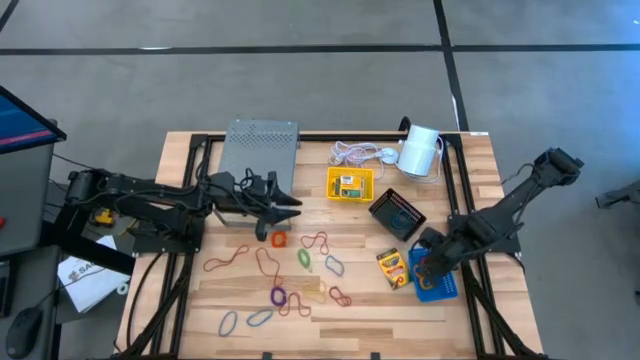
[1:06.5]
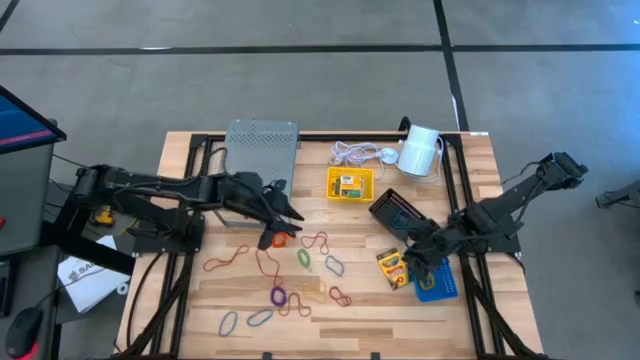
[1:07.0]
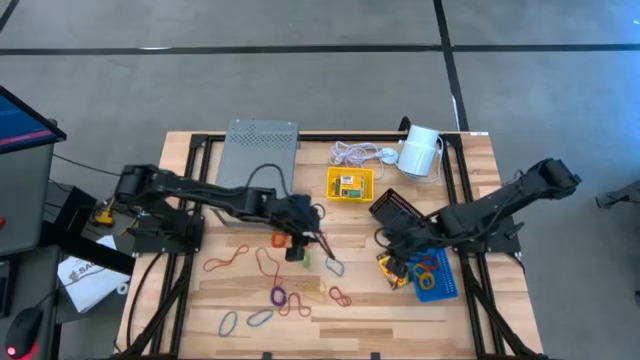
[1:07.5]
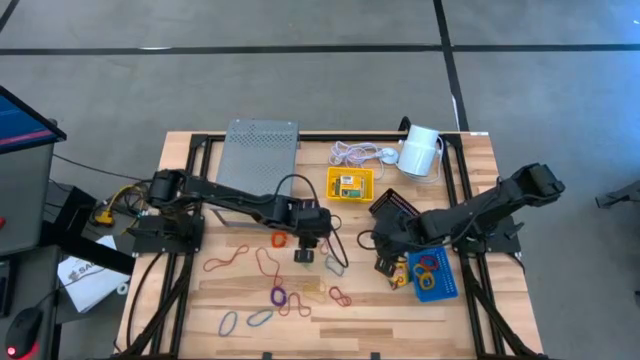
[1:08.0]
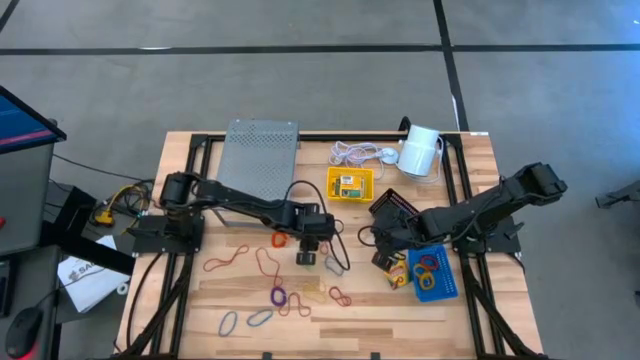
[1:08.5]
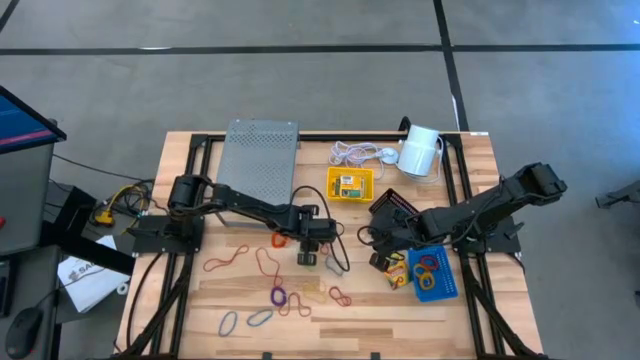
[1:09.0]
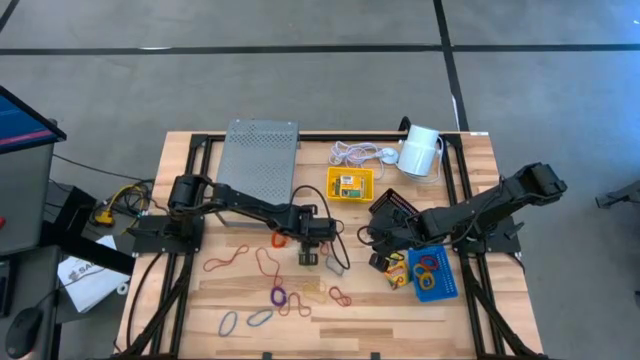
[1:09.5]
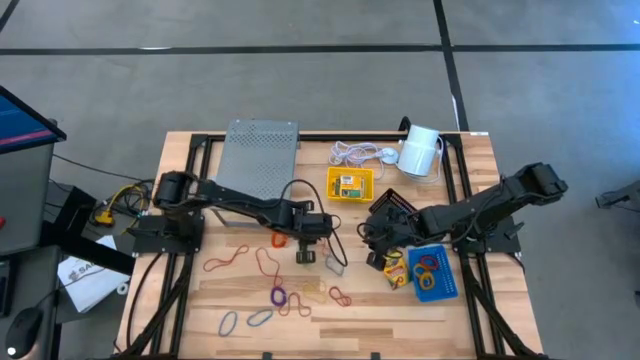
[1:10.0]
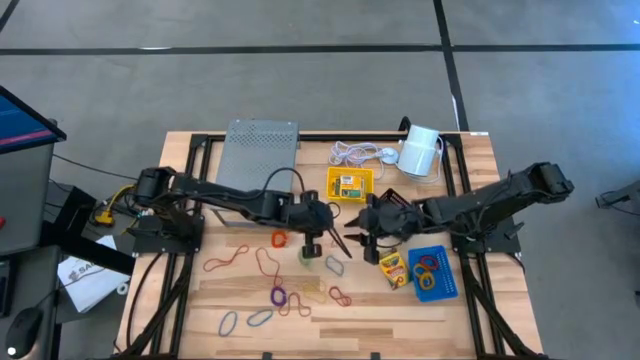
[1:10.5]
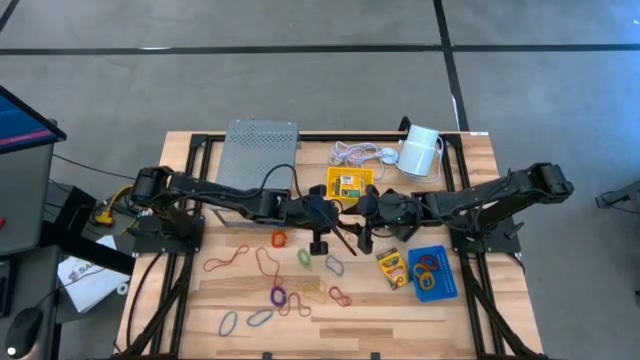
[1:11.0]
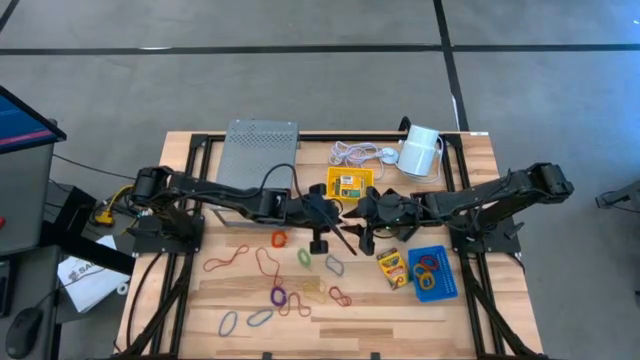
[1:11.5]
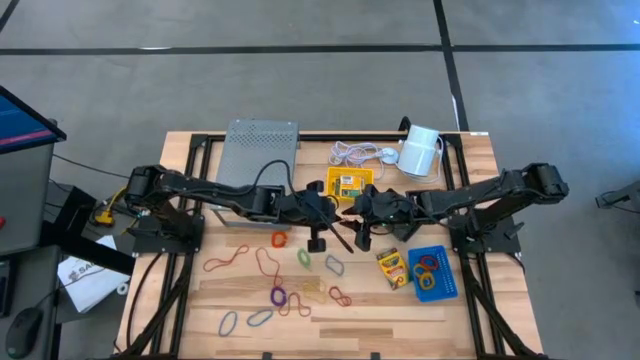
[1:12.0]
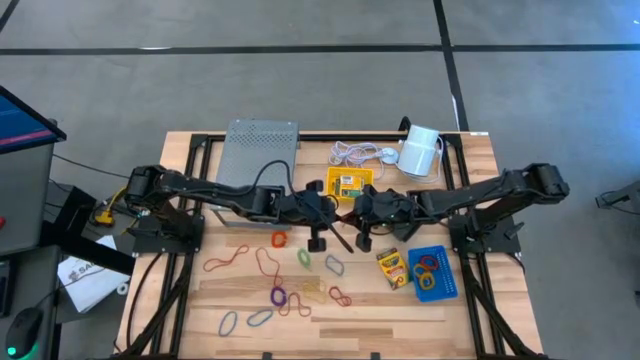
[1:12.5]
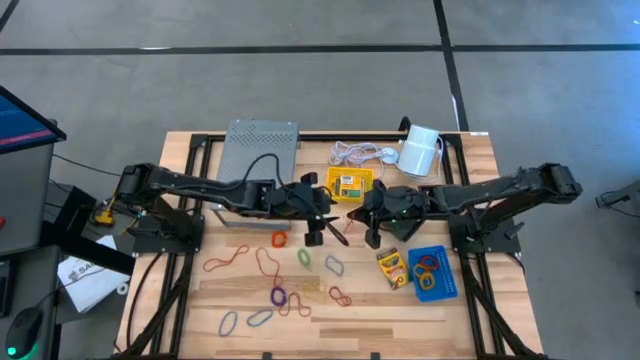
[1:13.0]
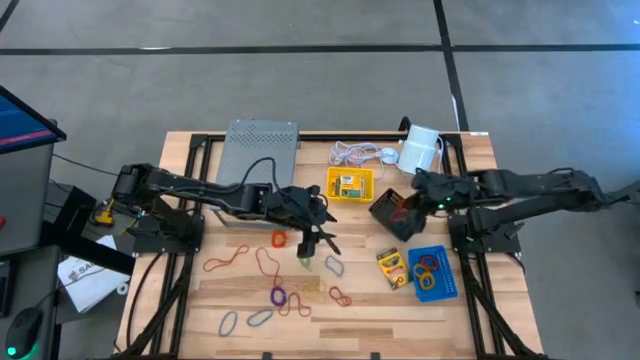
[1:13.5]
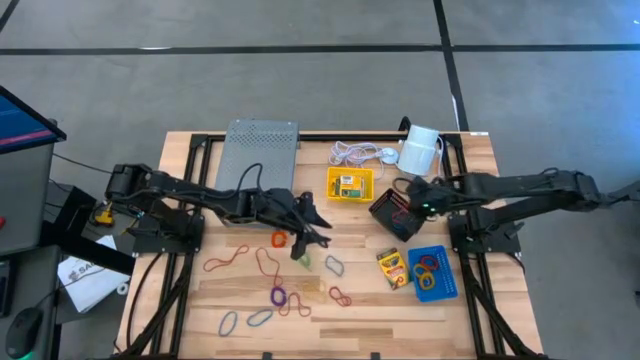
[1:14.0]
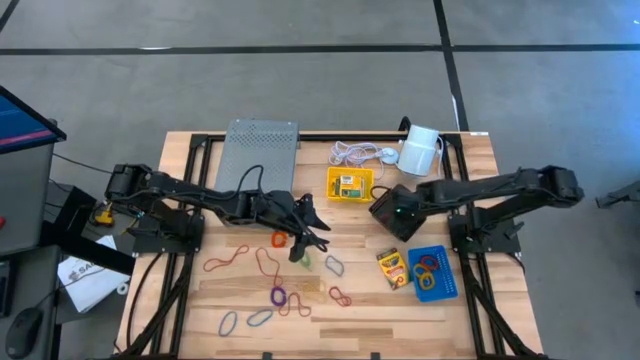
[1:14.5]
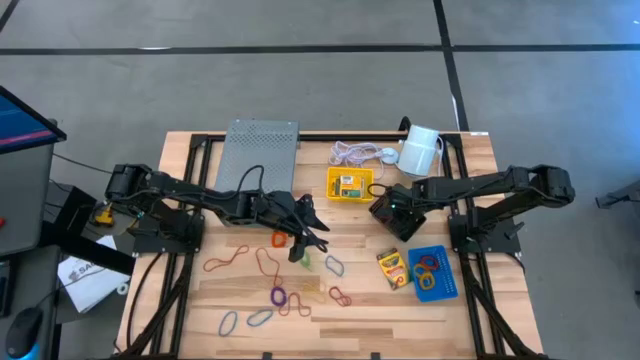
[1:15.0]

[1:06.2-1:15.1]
Task: Pick & Place Office Desk Supplies
Put the red rubber band into the black bin

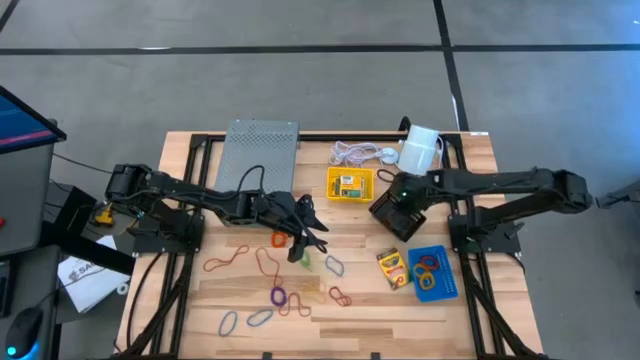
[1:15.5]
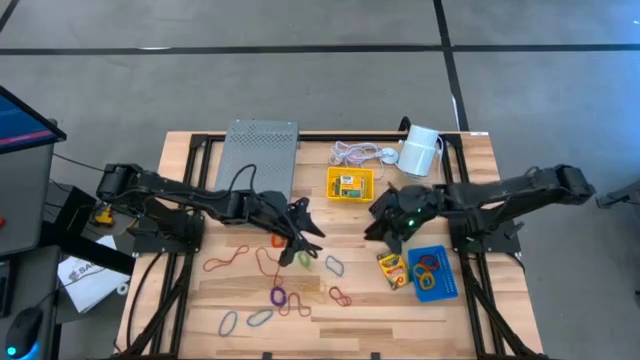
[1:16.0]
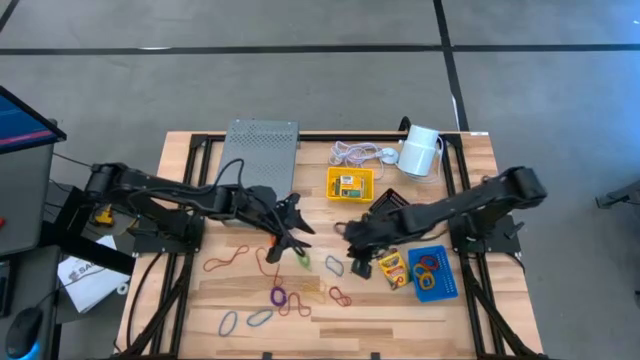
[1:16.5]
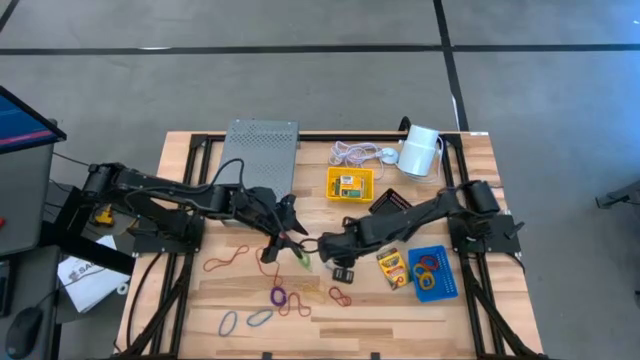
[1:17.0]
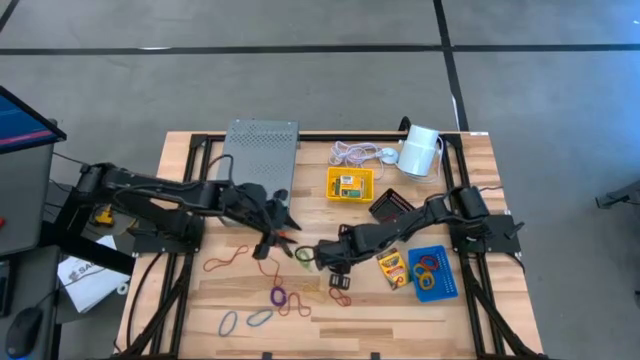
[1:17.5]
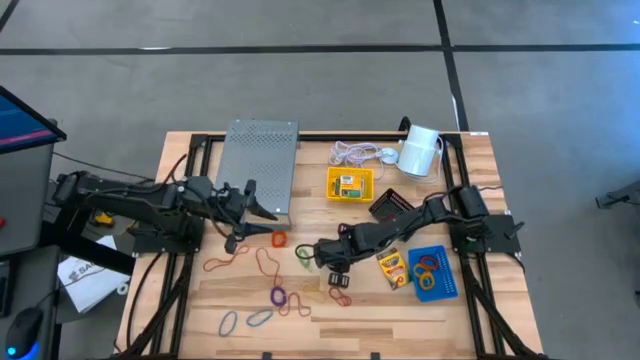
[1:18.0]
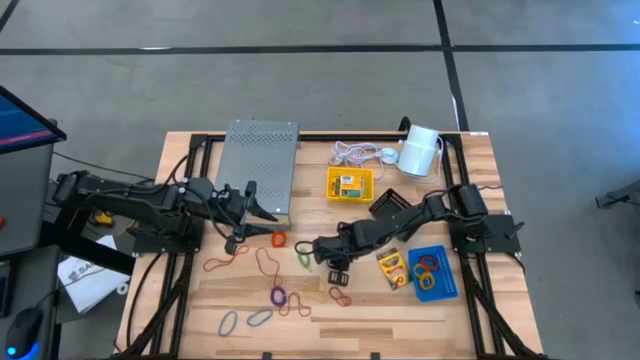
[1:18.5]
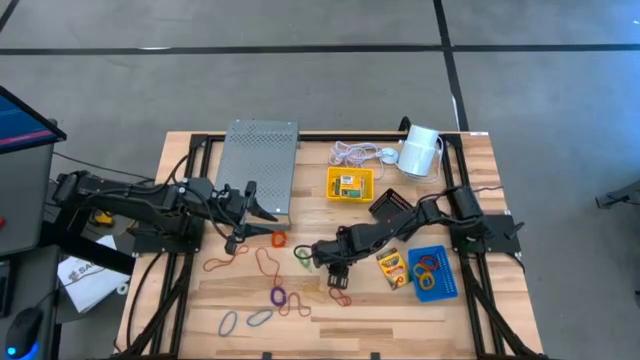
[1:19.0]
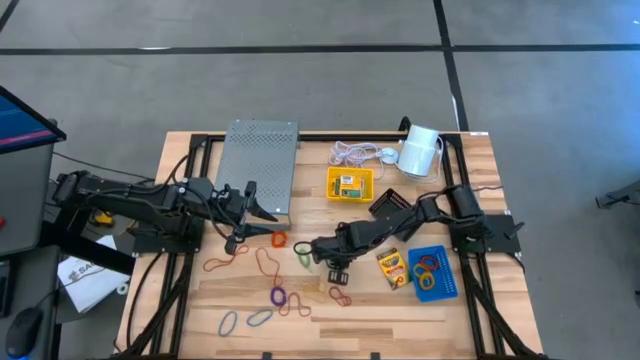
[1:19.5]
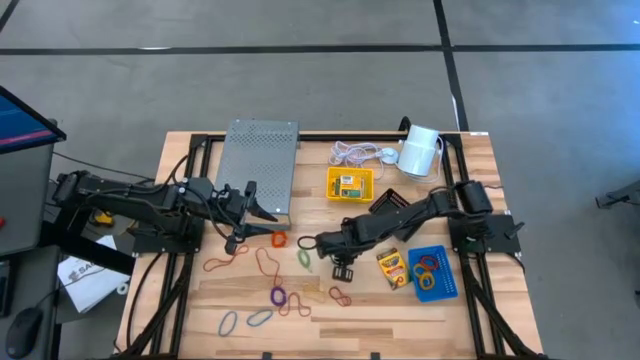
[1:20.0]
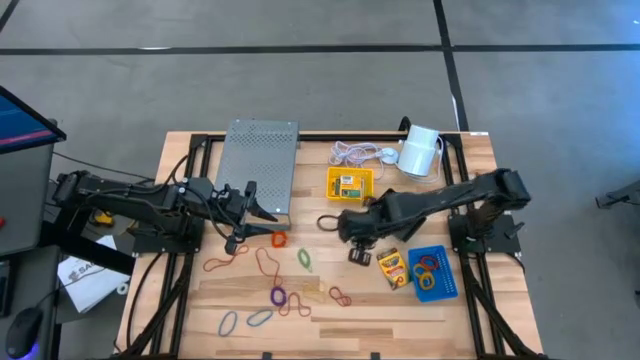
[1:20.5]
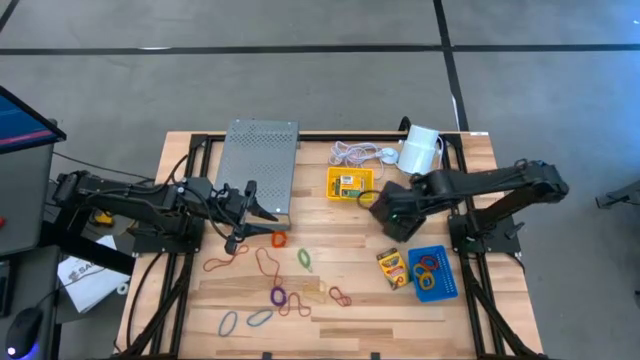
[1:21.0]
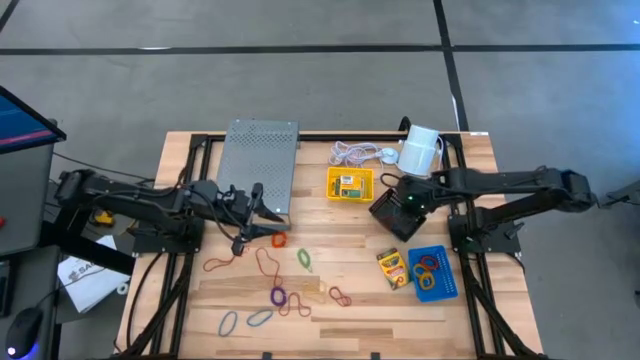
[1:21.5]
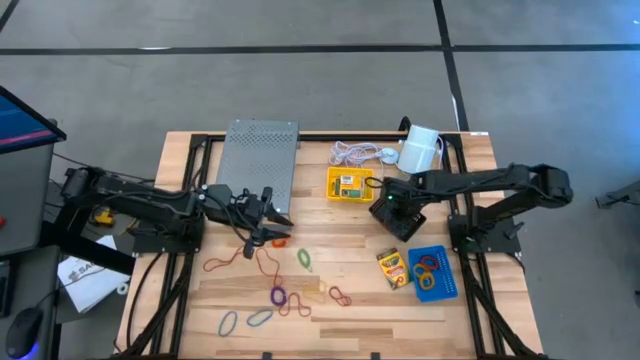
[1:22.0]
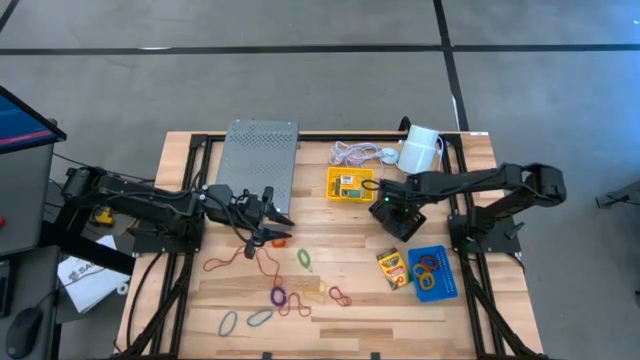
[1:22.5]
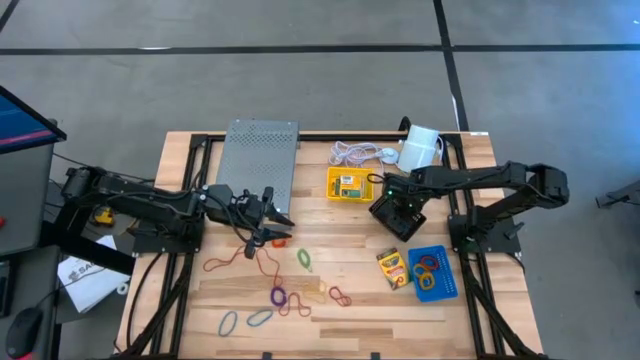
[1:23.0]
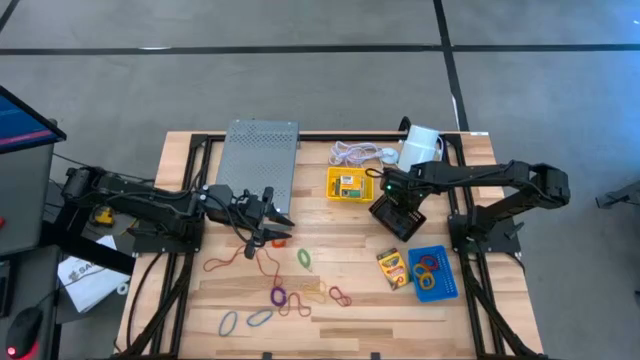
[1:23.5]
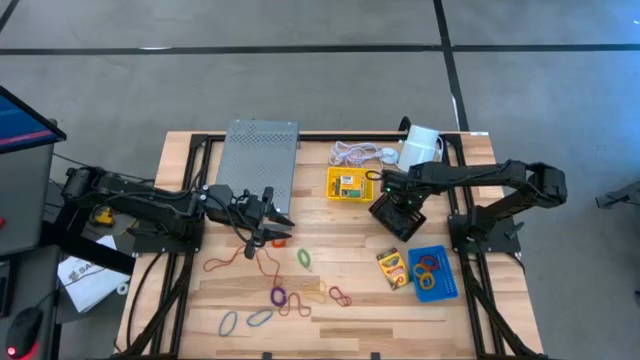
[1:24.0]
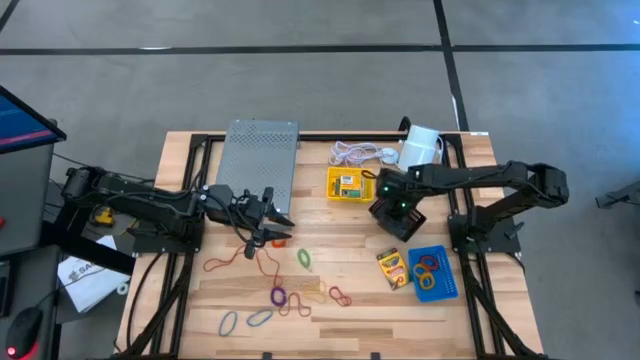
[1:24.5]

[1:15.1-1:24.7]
Put the blue rubber band into the black bin
